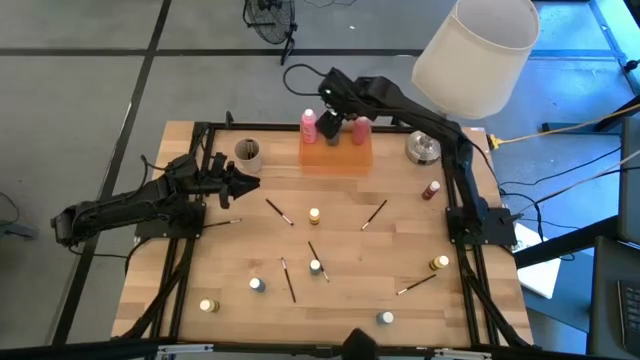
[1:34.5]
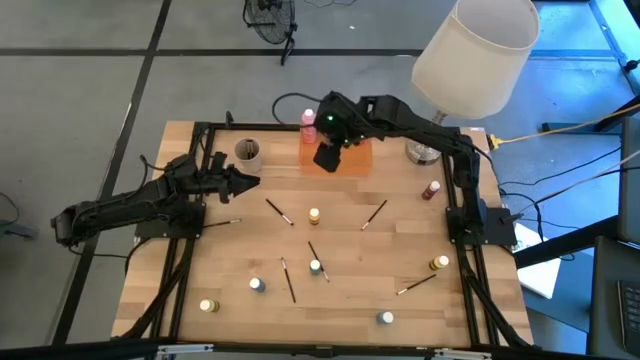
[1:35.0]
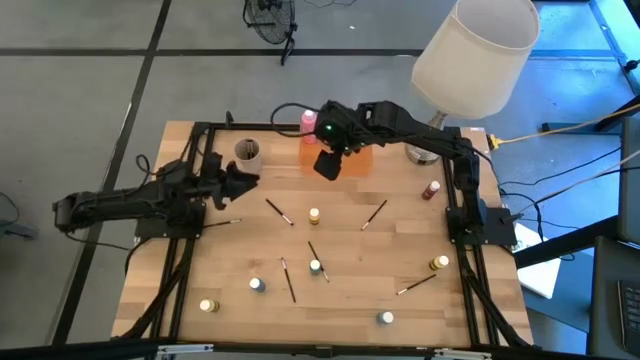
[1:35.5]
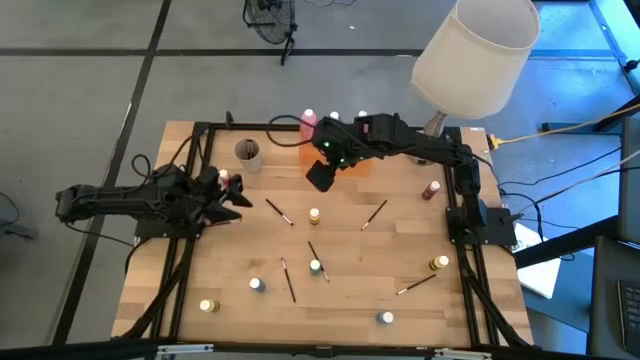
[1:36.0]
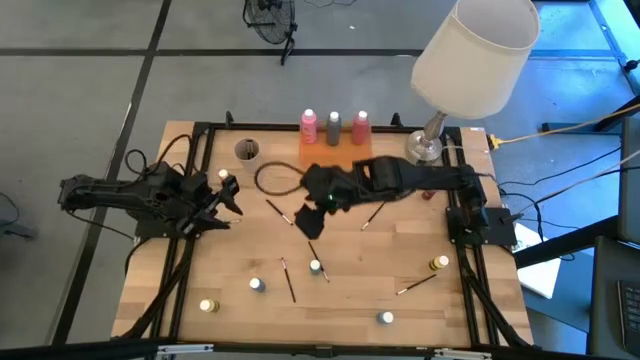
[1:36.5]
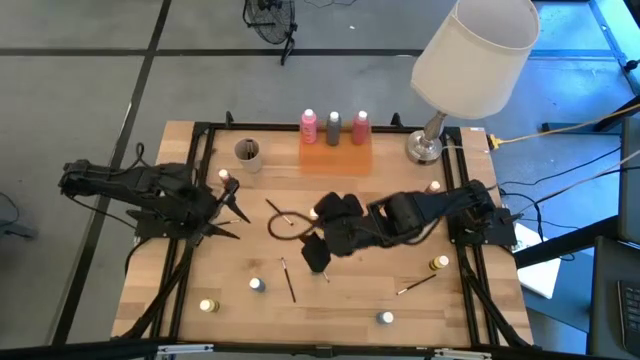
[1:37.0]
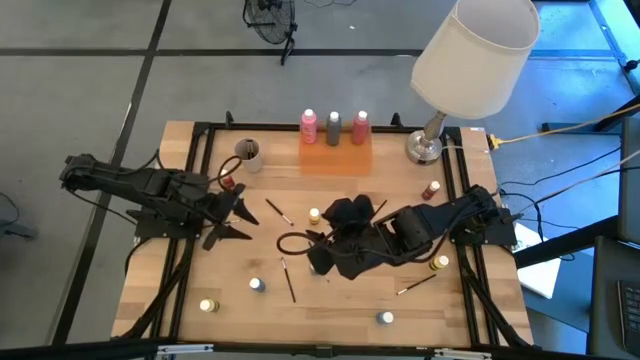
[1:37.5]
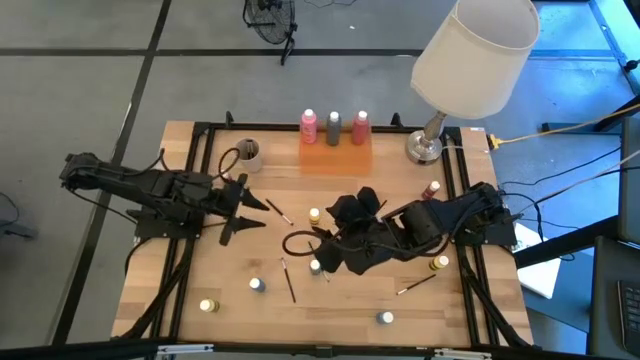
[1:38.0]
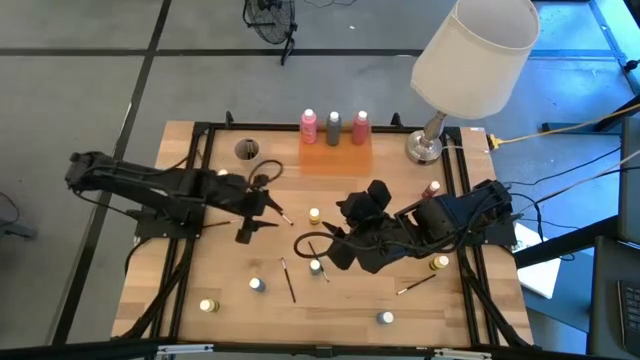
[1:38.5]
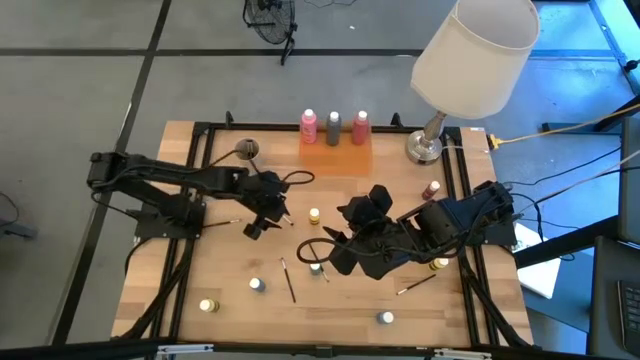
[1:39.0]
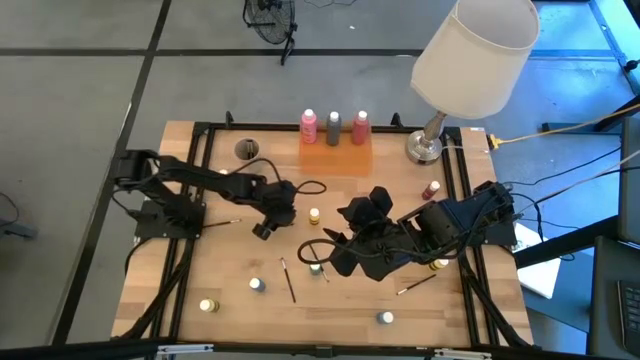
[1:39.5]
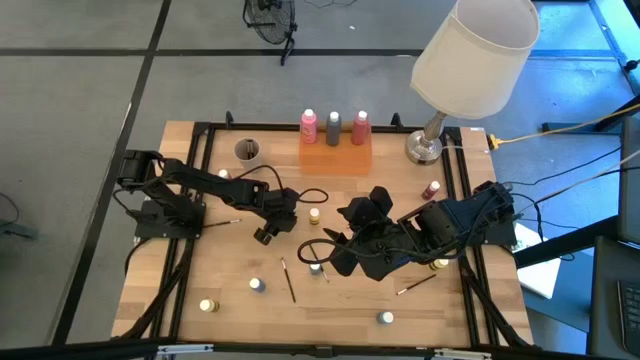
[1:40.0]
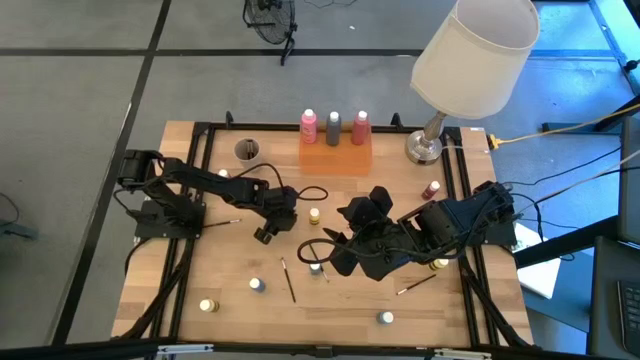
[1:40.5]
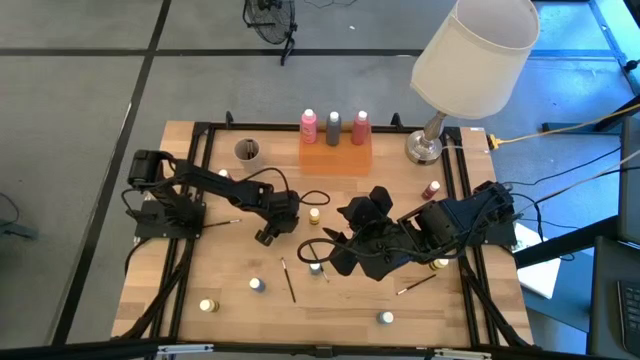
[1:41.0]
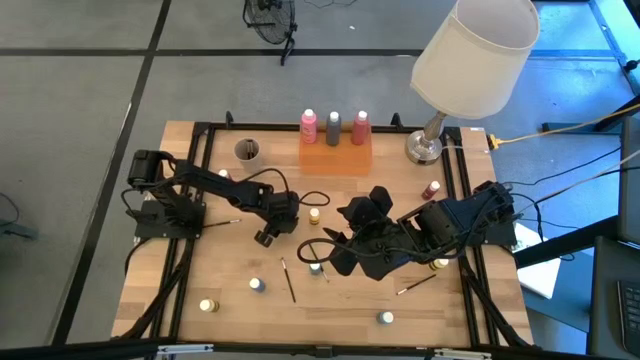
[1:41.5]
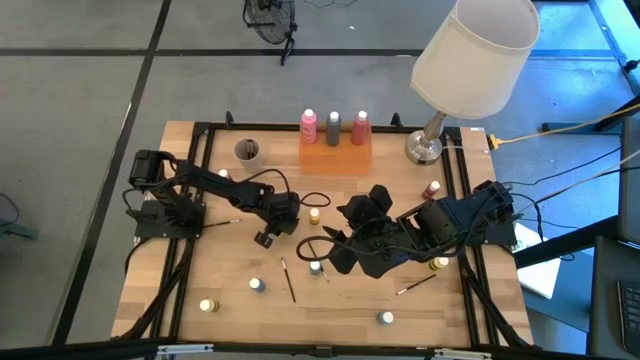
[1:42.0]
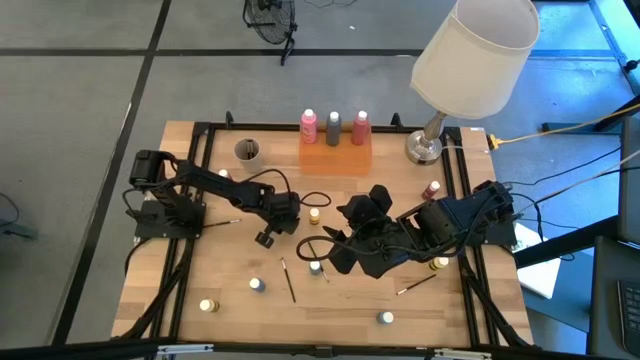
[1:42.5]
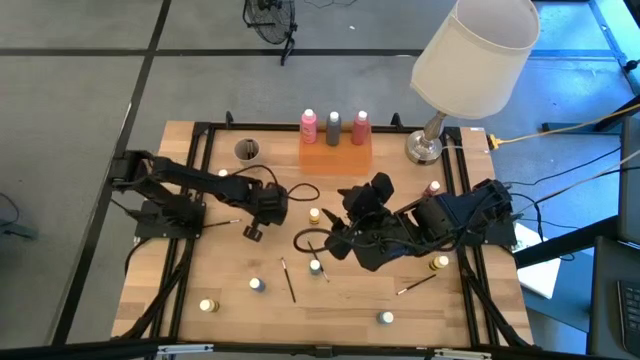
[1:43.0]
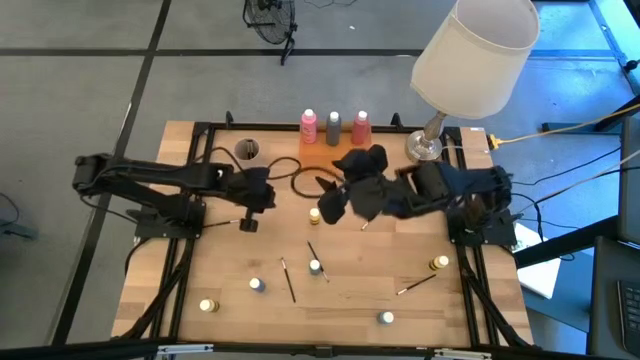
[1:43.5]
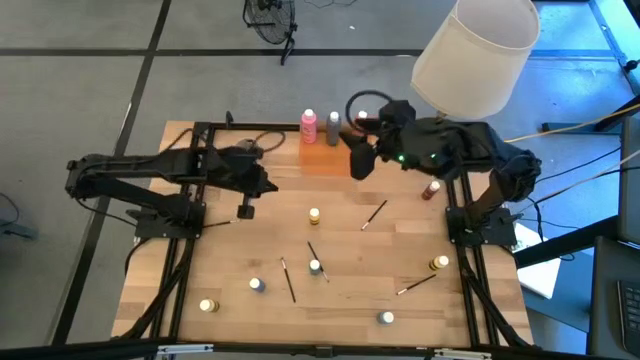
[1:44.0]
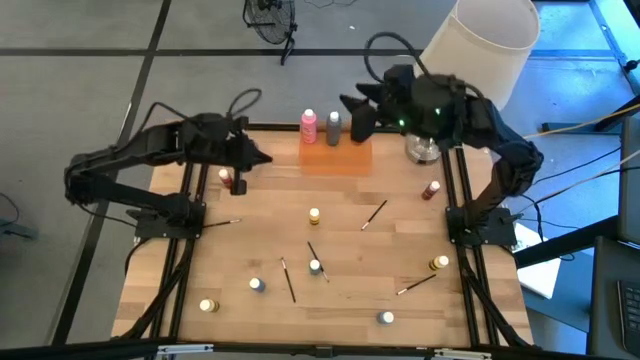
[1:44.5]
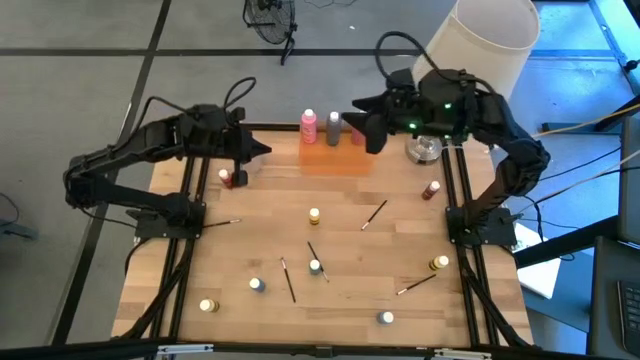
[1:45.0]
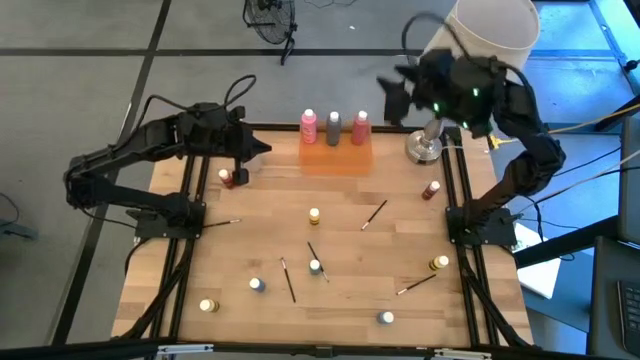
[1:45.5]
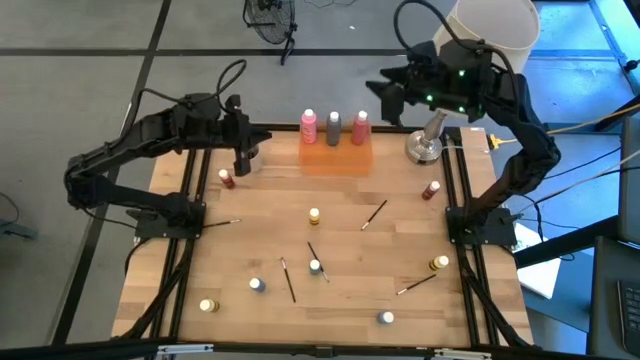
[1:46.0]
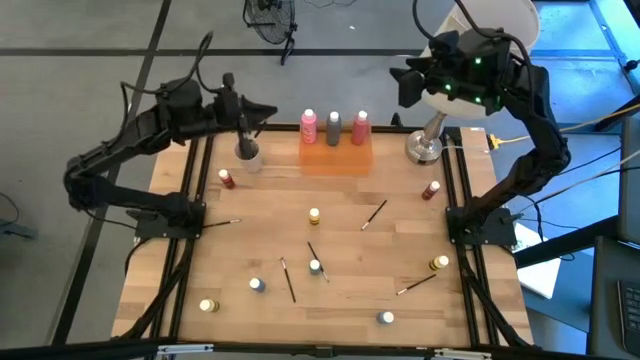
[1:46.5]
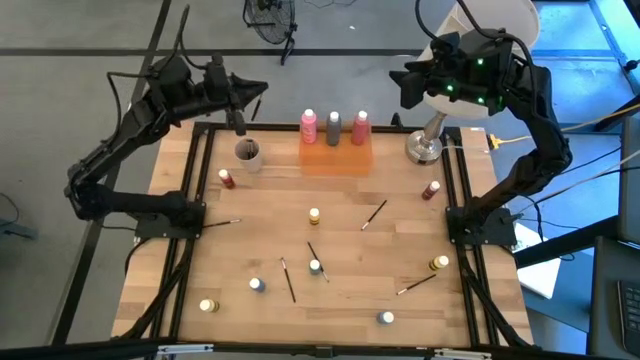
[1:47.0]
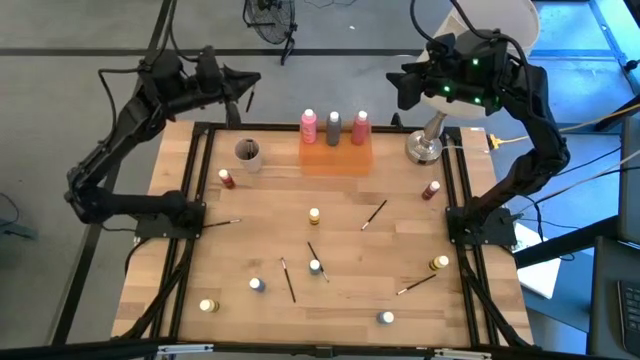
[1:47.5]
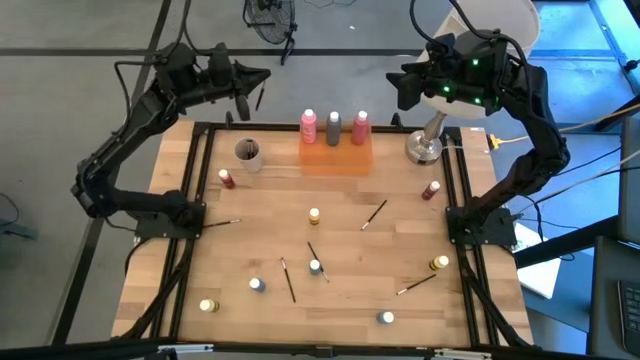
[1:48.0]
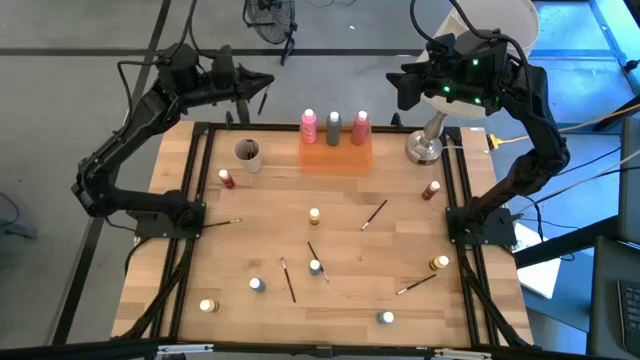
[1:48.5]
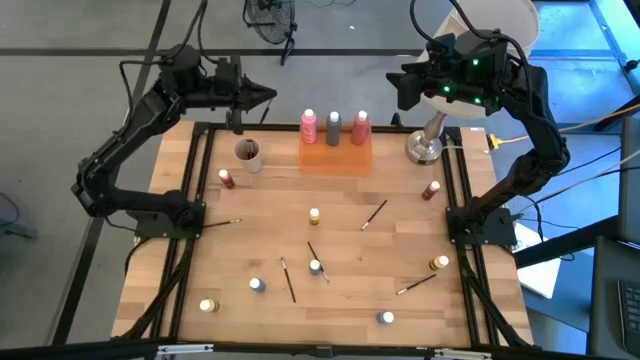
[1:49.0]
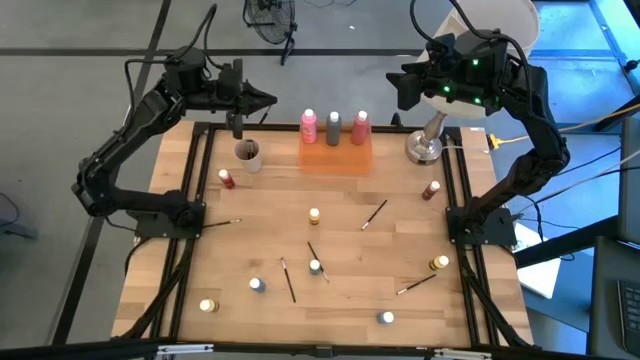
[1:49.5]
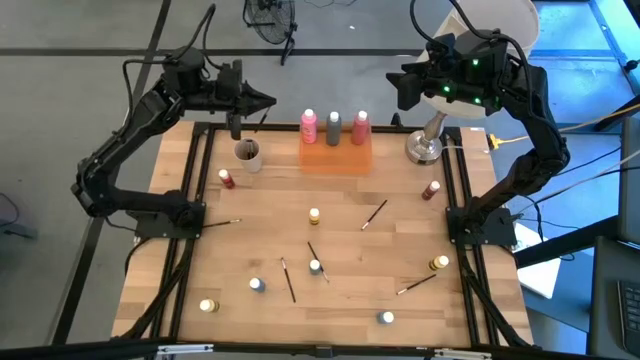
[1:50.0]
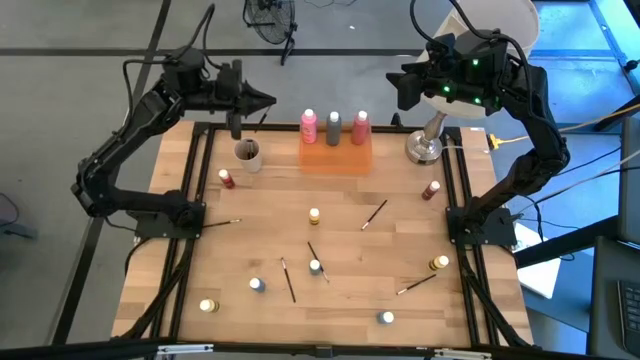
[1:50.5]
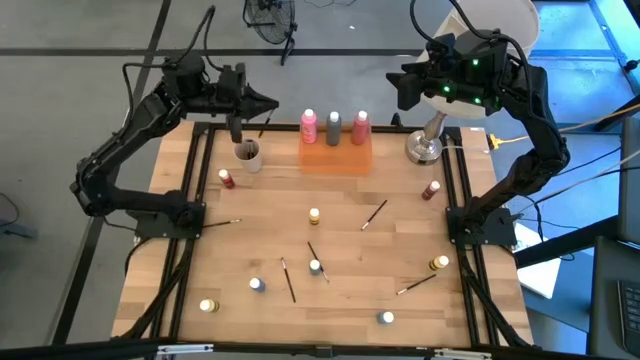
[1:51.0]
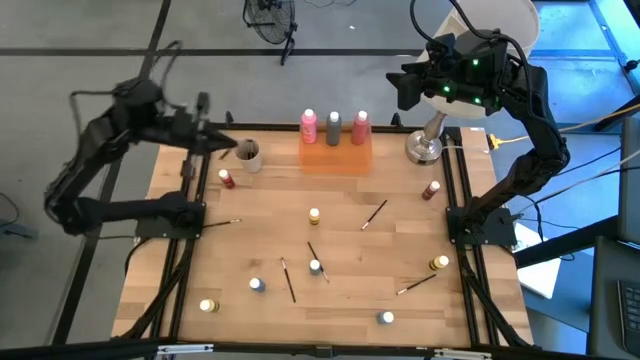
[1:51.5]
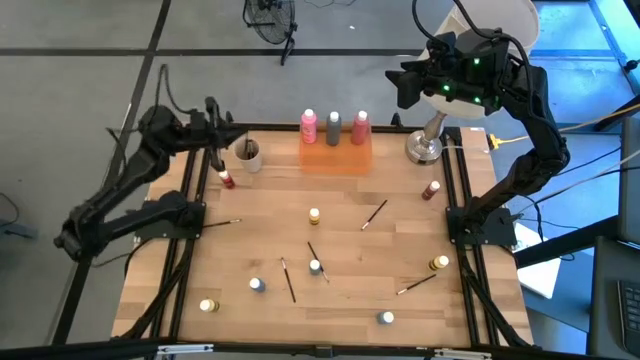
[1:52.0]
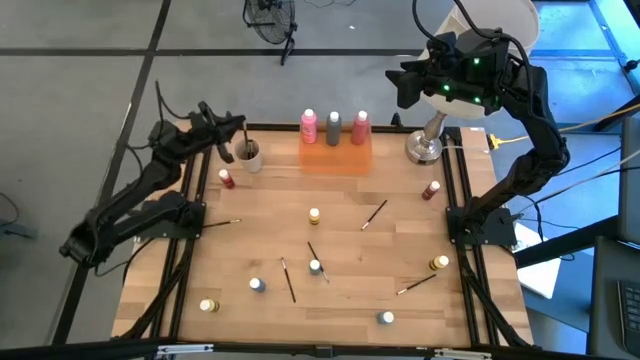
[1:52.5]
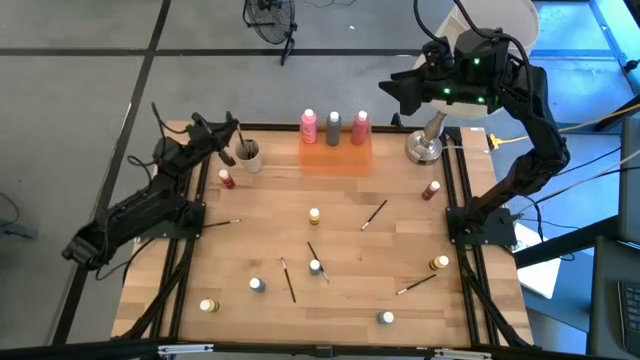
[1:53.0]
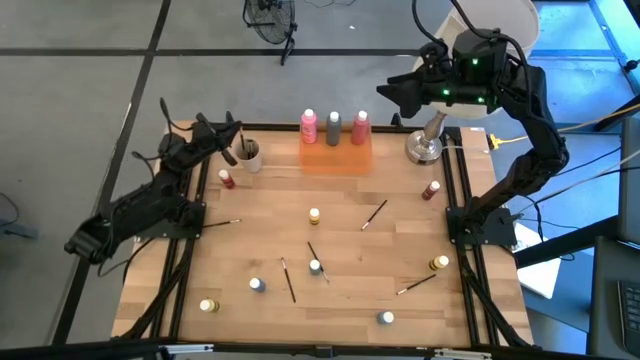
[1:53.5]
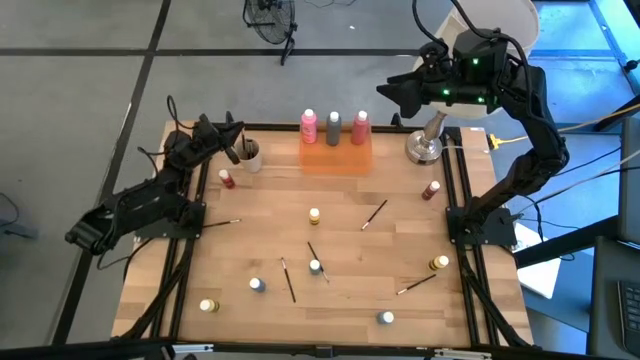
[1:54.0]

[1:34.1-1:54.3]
Task: Pick & Place Paint Supplies
Put the silver paint brush into the white cup
